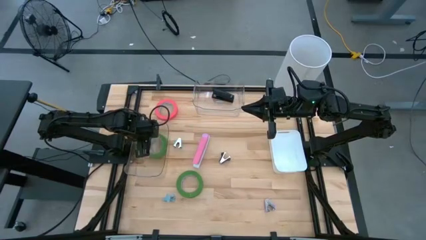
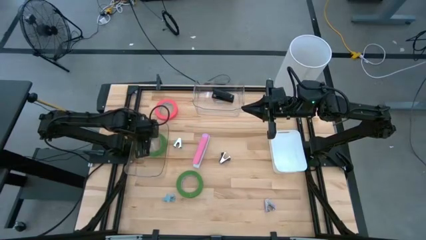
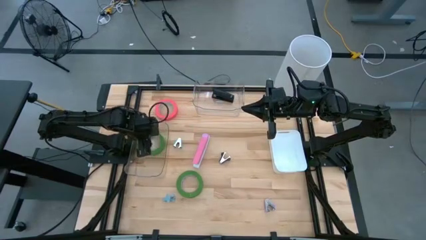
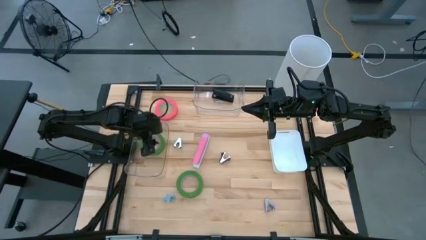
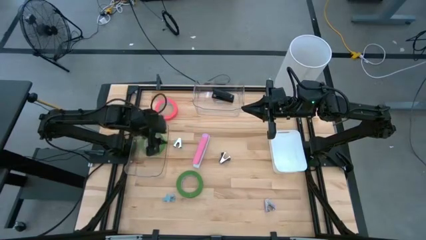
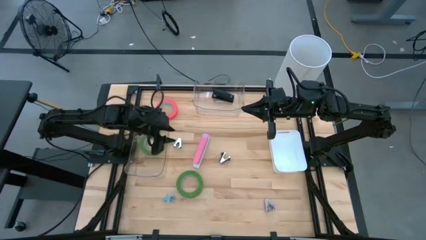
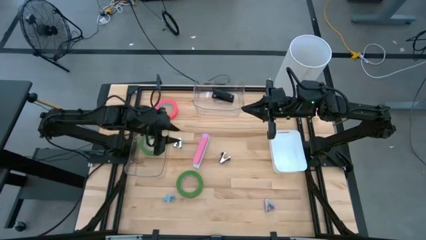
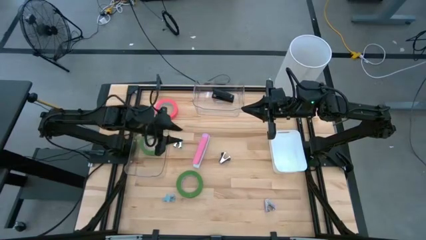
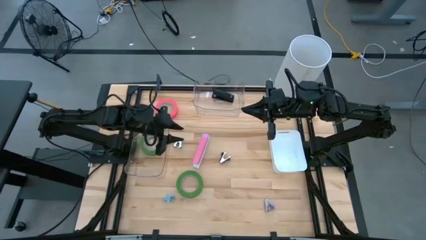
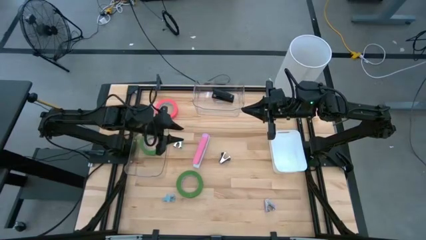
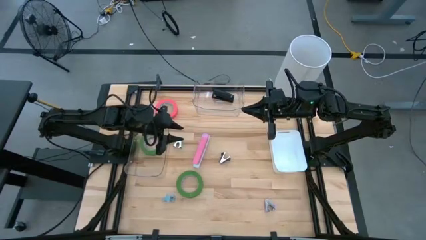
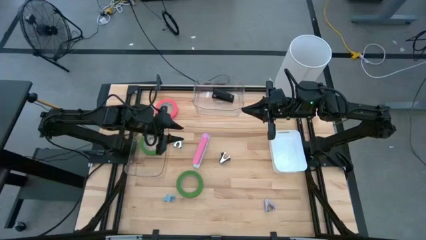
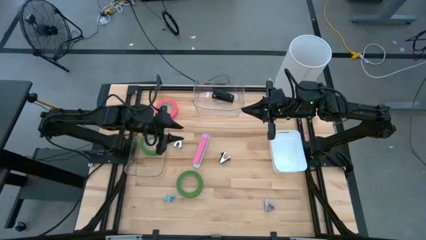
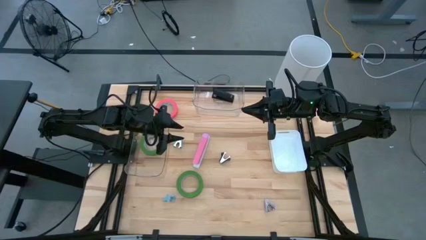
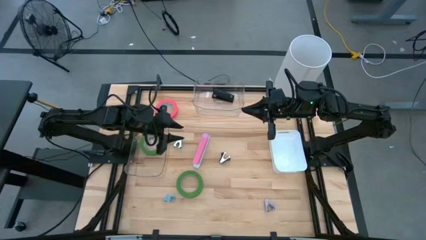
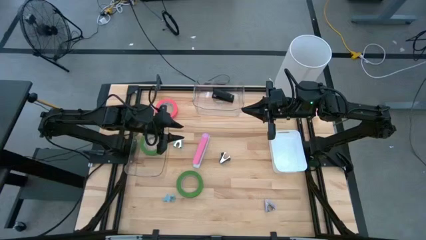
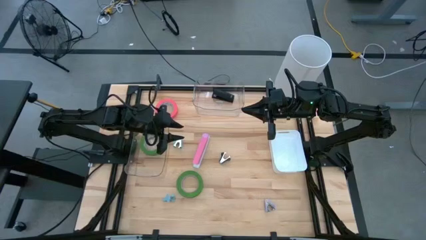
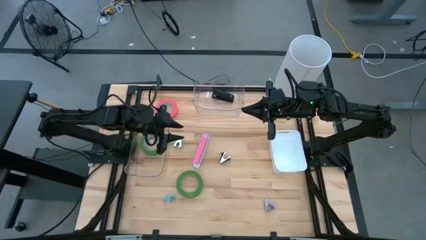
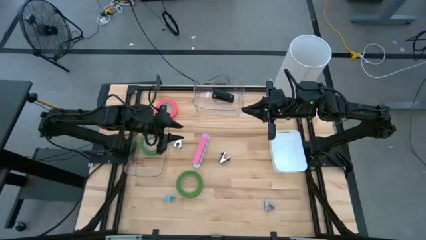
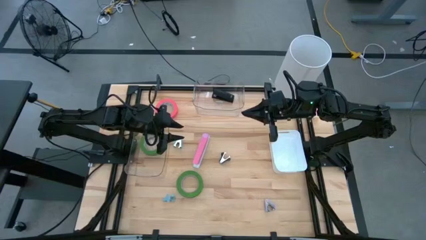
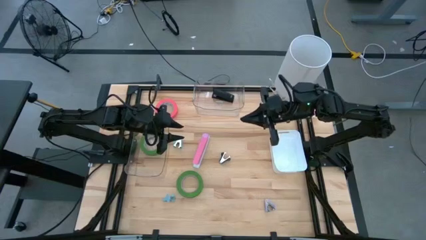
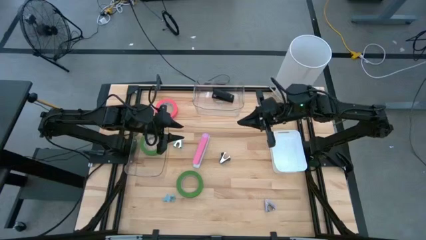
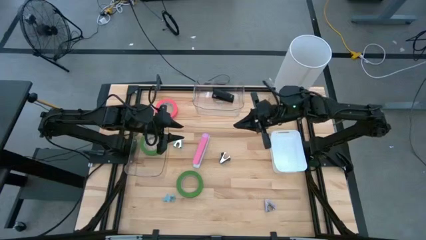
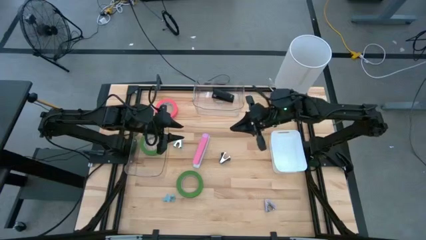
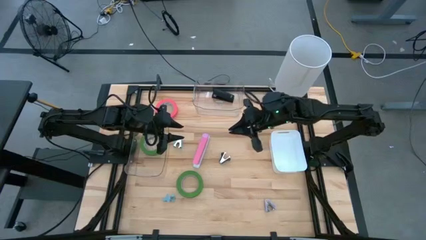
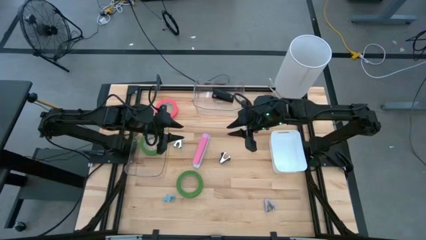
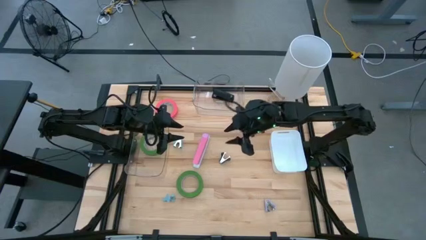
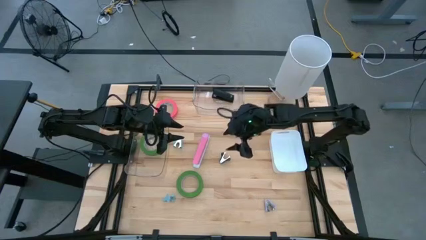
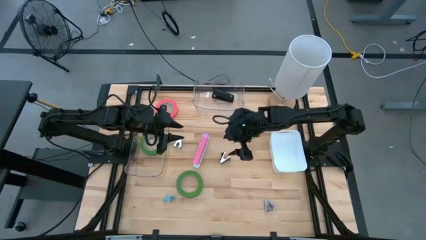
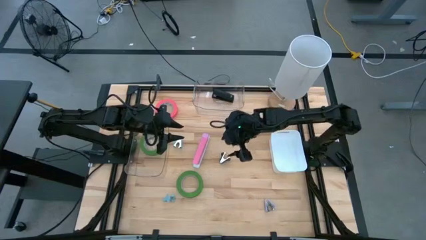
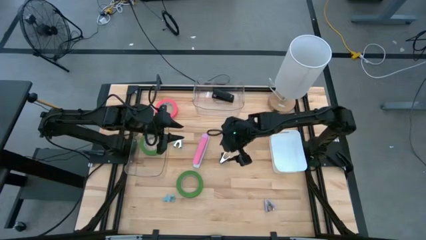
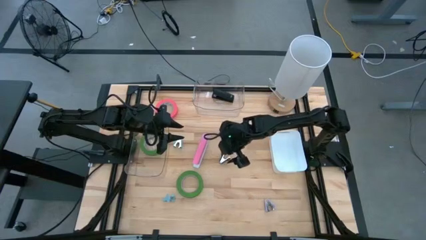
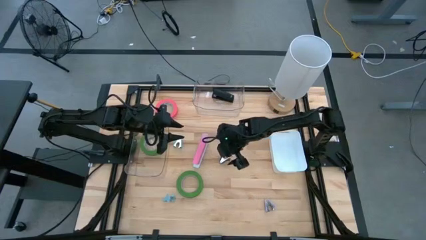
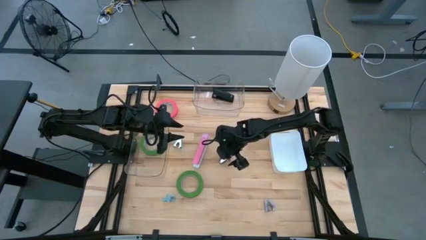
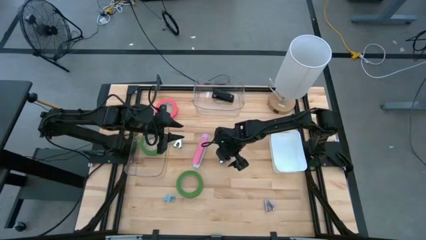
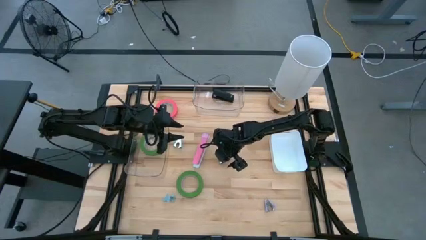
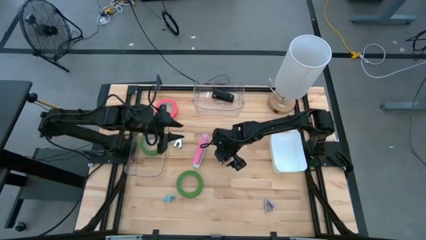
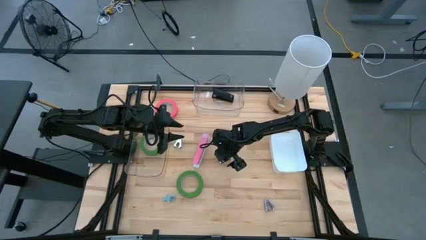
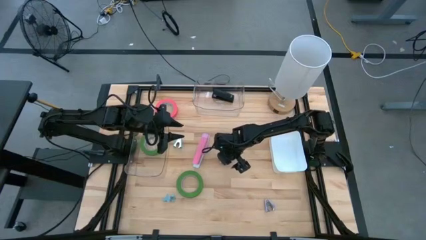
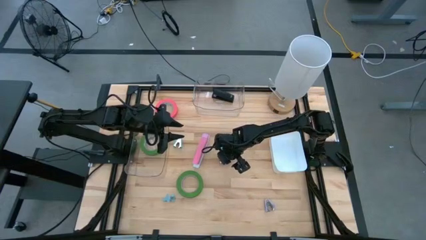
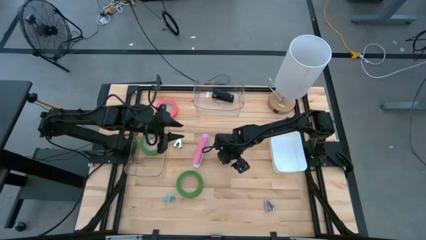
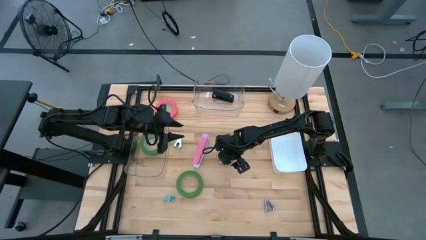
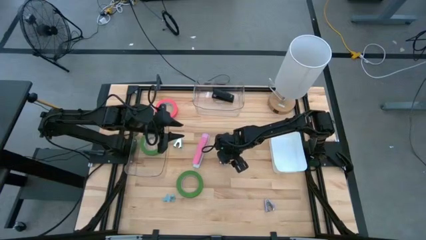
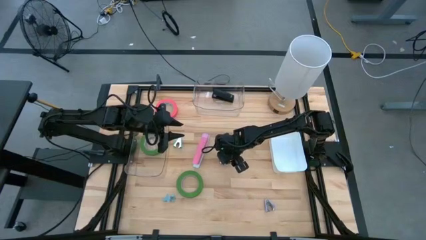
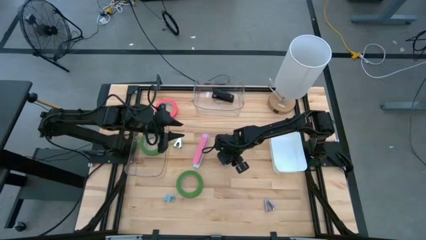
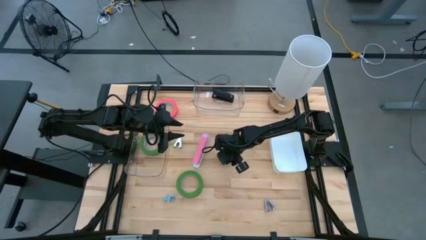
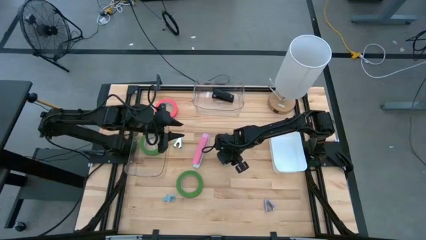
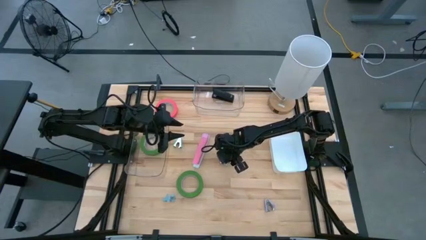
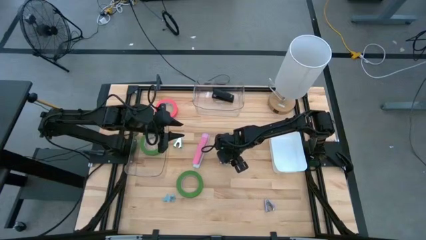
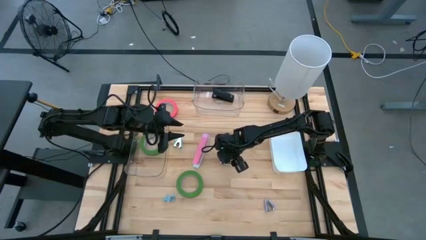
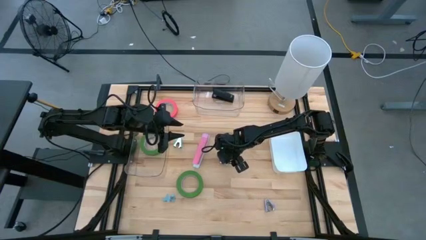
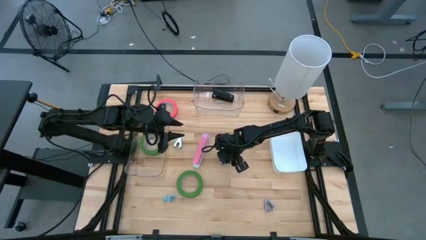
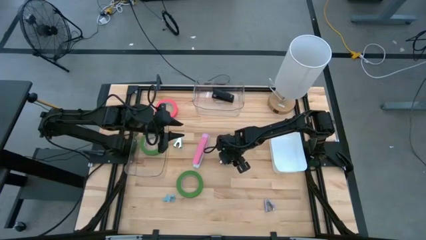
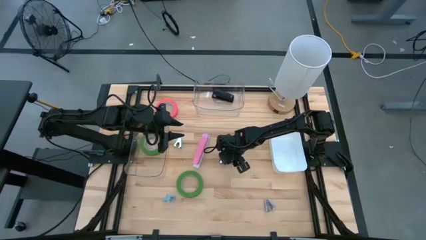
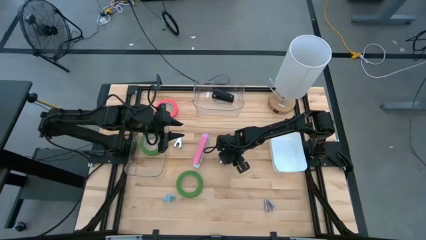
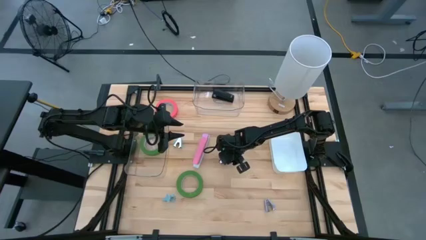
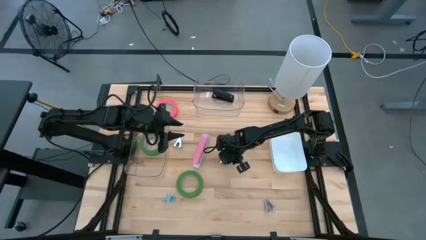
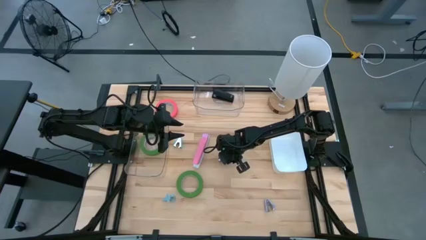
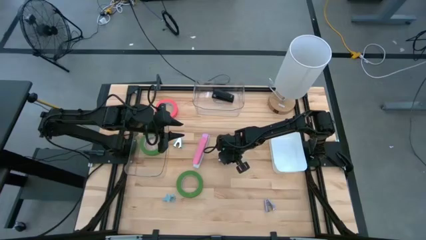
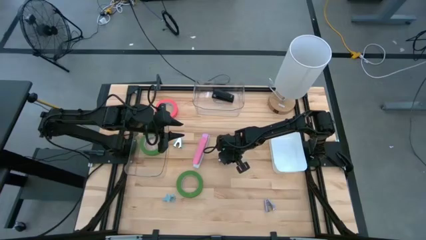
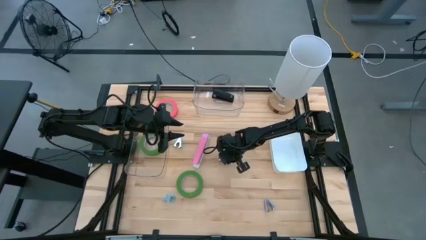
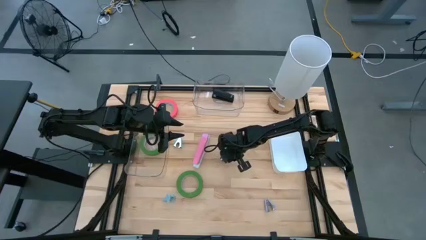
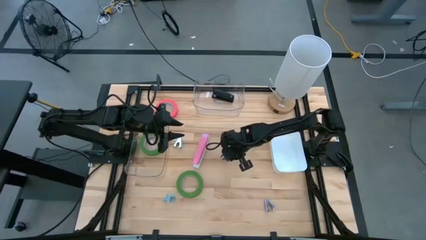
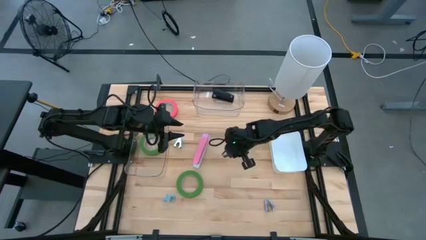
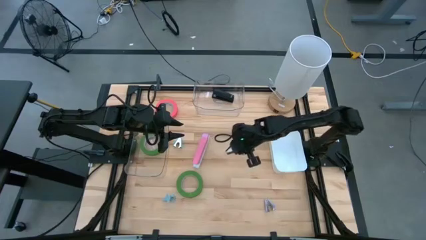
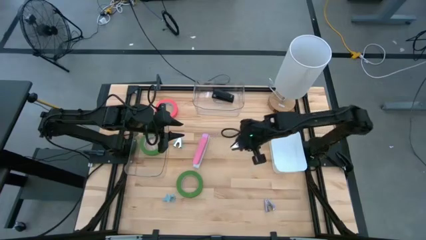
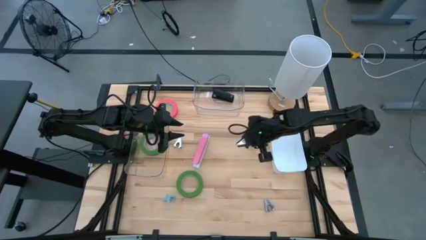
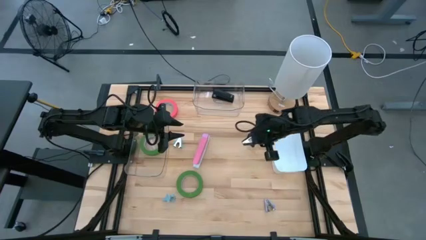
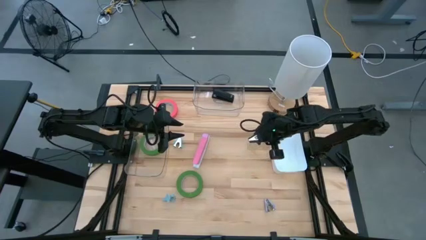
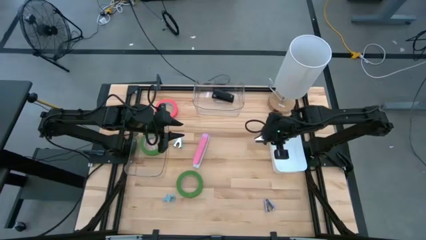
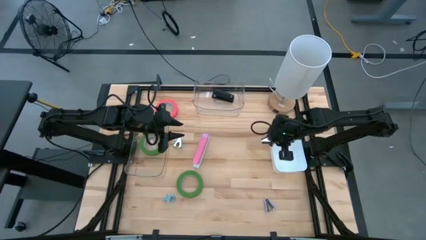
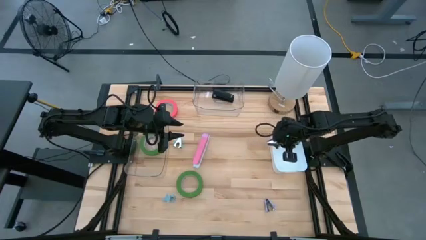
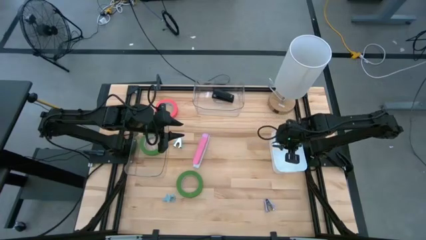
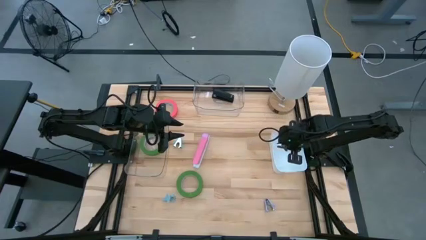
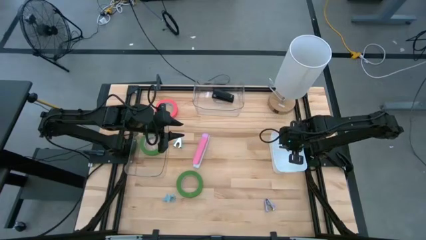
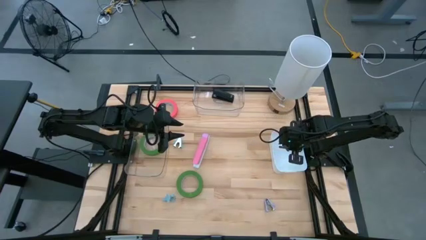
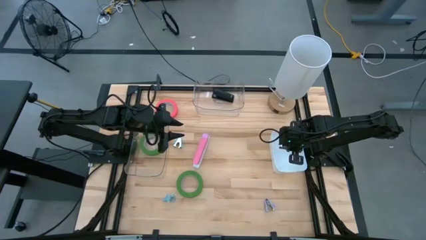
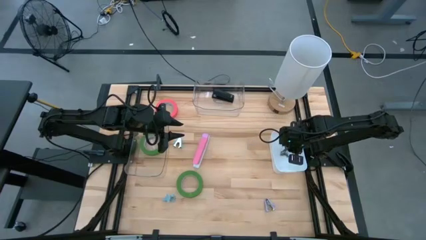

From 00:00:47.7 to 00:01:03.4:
Task: Pick and place Stapler, Stapler remover, tape
Put the black staple remover into the white bin

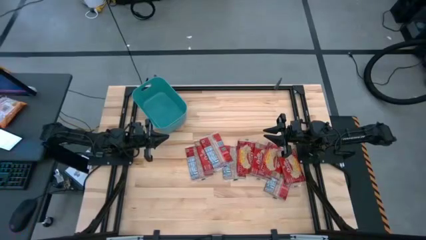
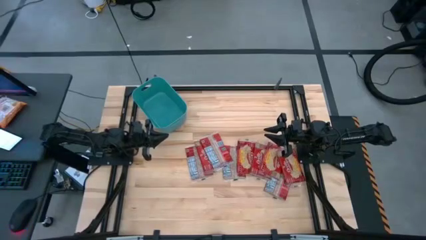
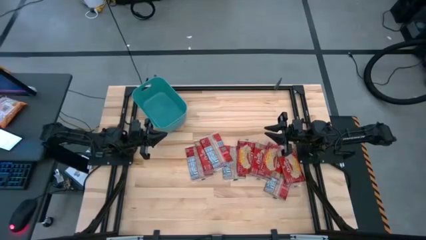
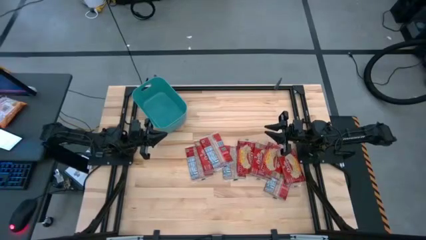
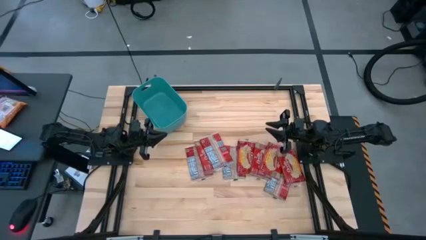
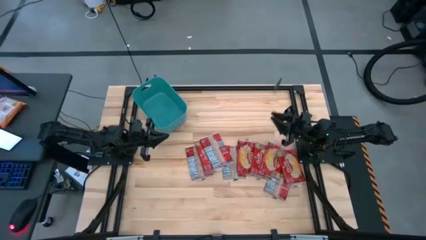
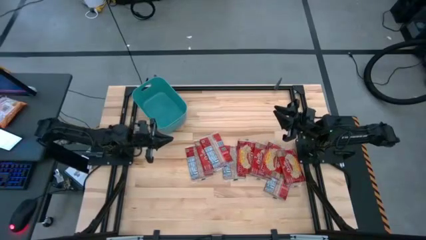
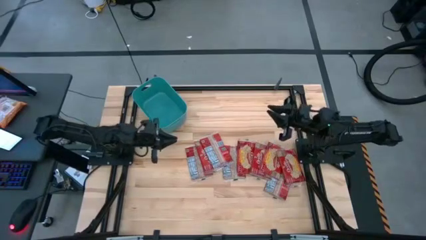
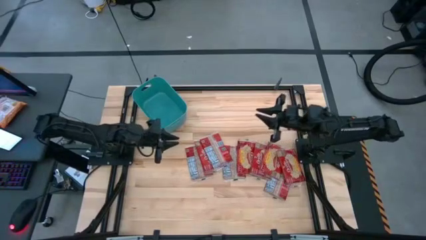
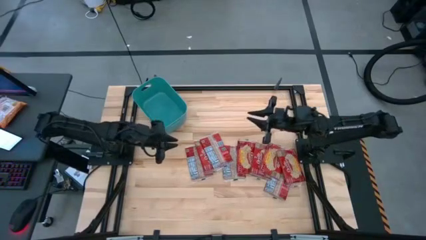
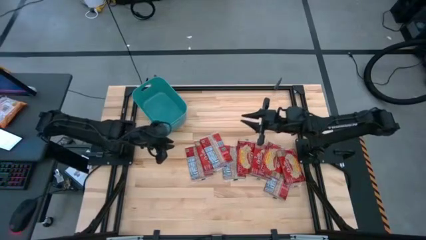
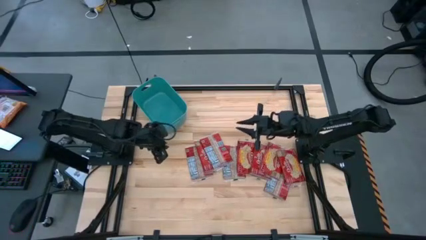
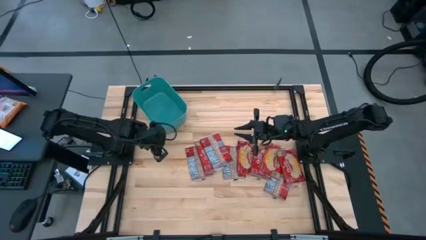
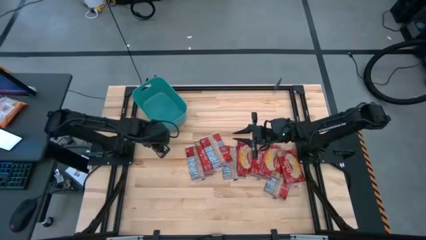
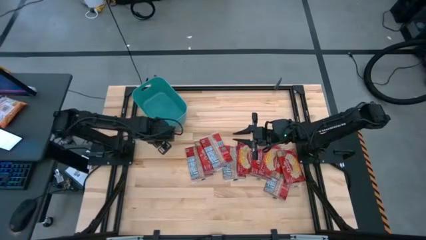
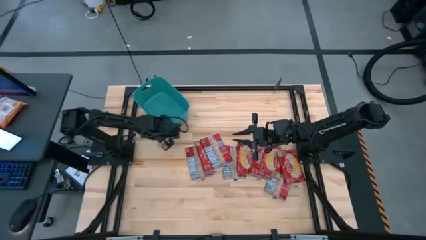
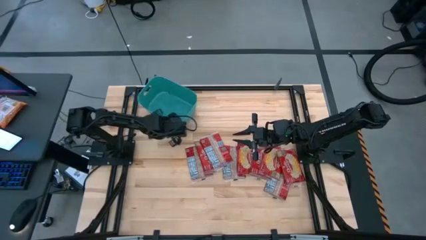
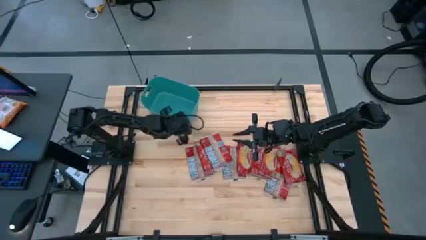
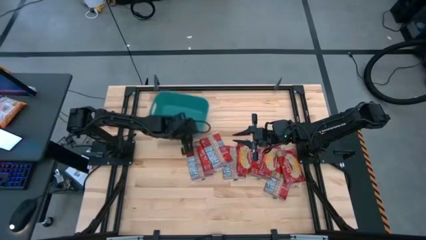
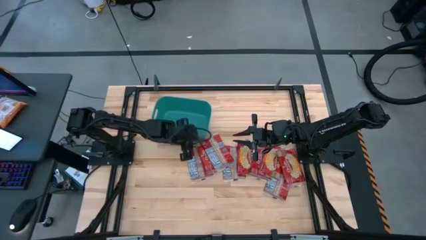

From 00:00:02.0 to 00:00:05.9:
Task: Sort popcorn bags into baskets
Adjust the green bin on the table
